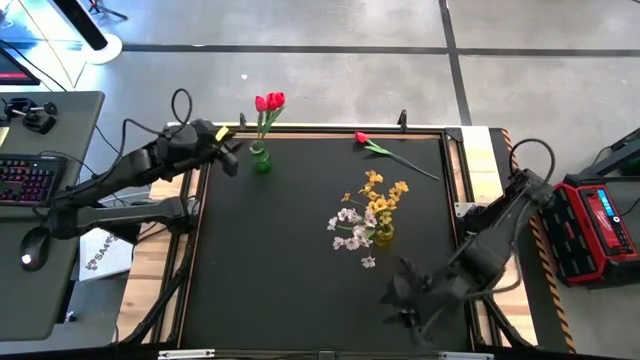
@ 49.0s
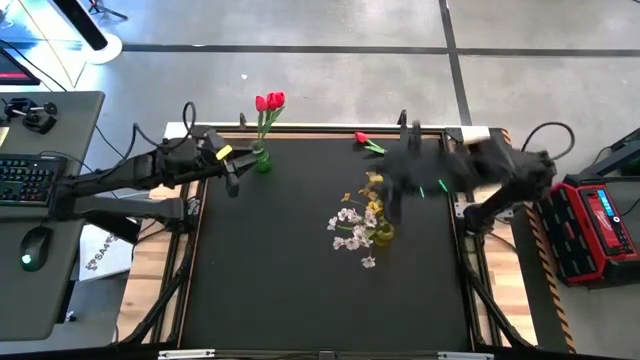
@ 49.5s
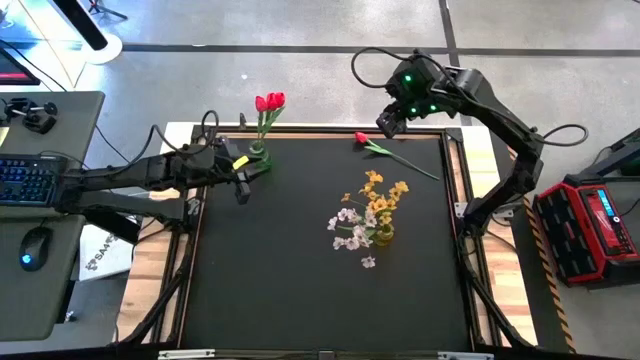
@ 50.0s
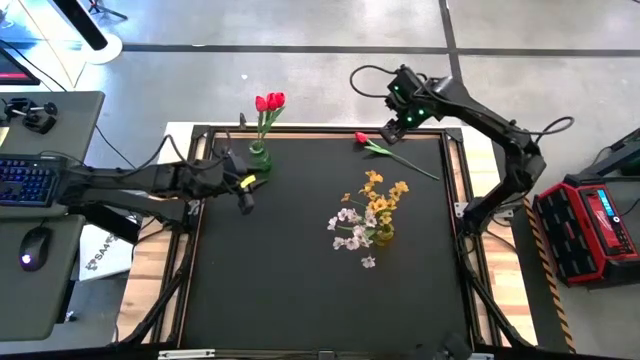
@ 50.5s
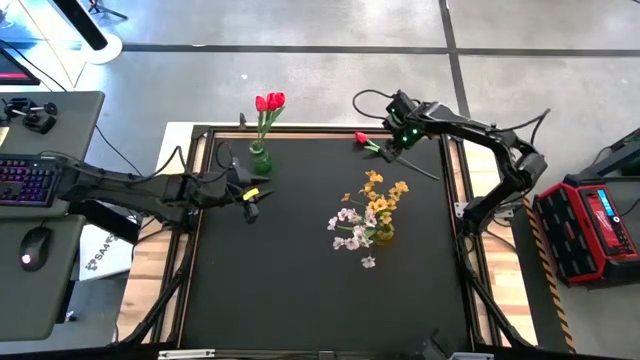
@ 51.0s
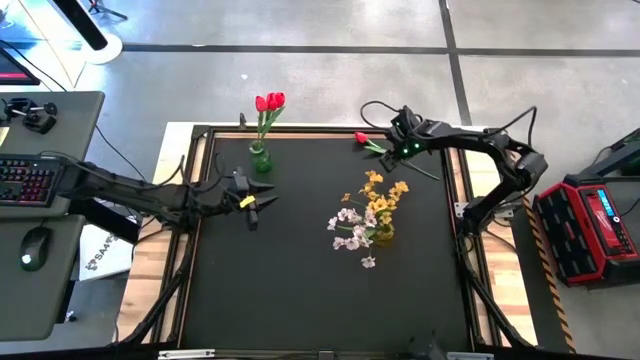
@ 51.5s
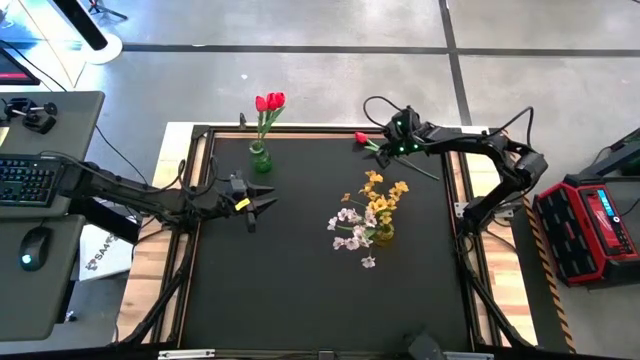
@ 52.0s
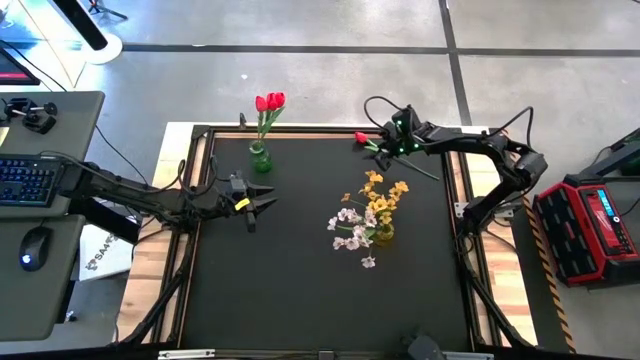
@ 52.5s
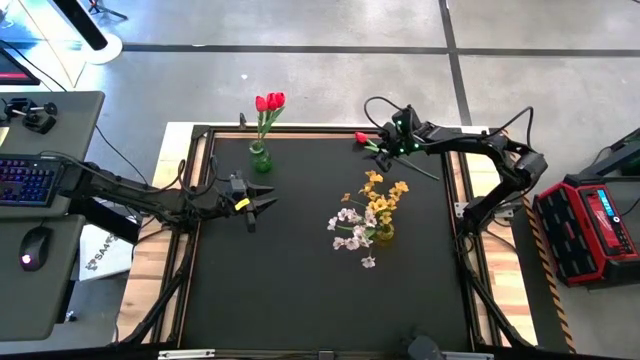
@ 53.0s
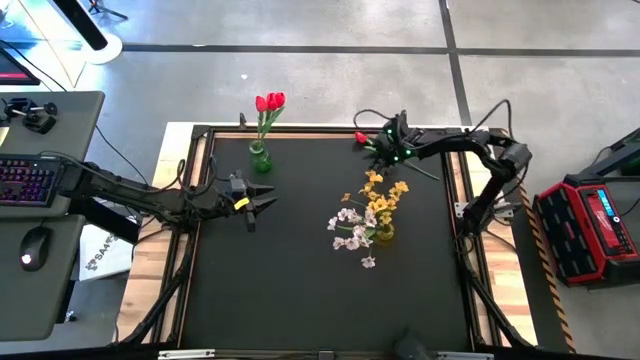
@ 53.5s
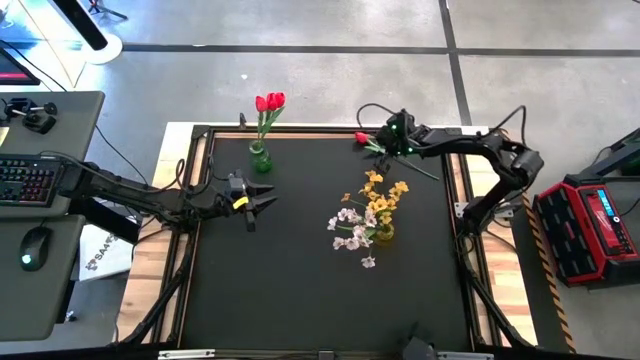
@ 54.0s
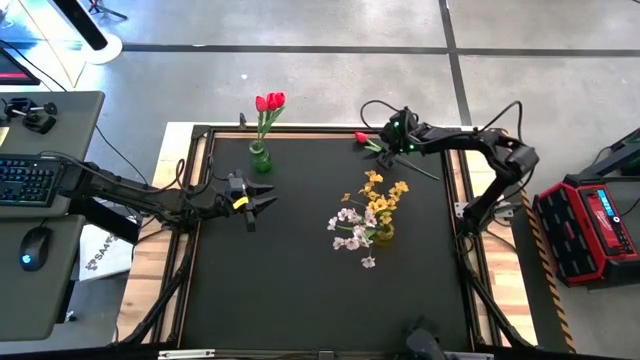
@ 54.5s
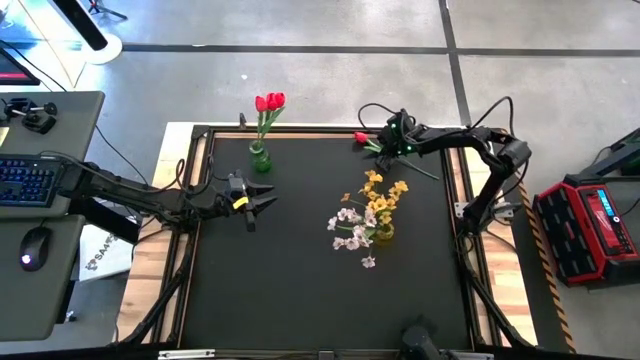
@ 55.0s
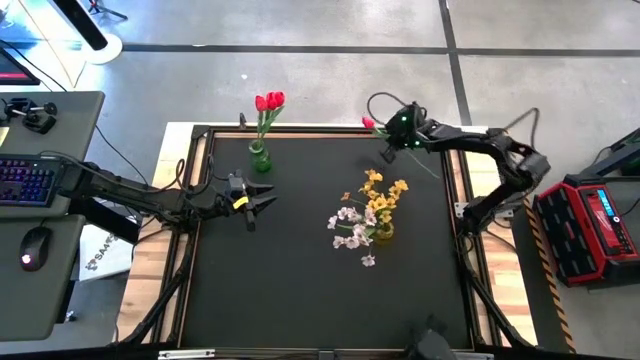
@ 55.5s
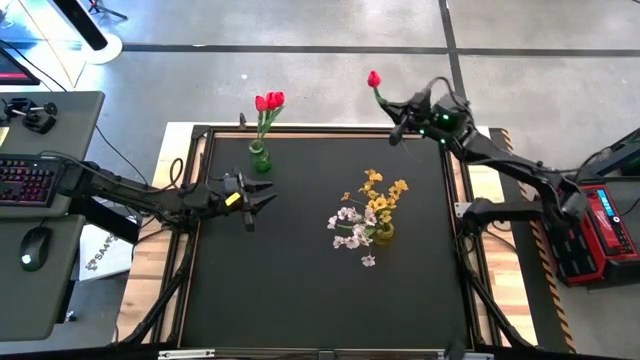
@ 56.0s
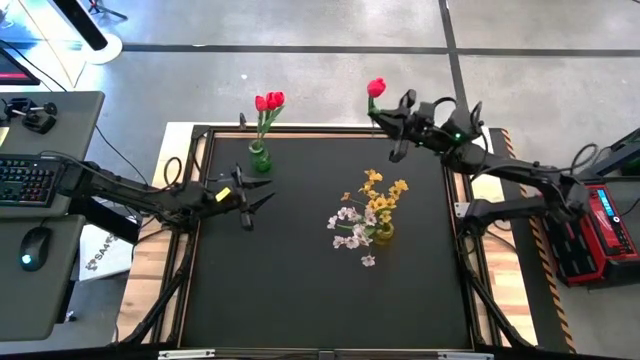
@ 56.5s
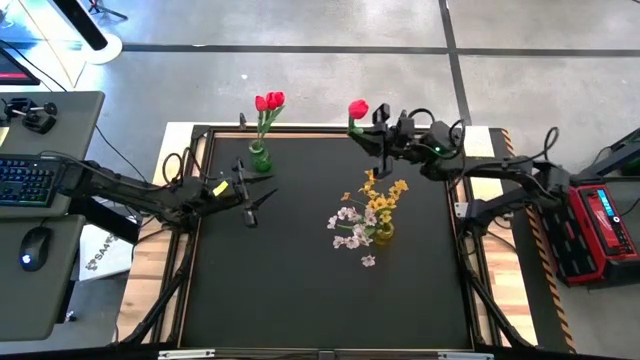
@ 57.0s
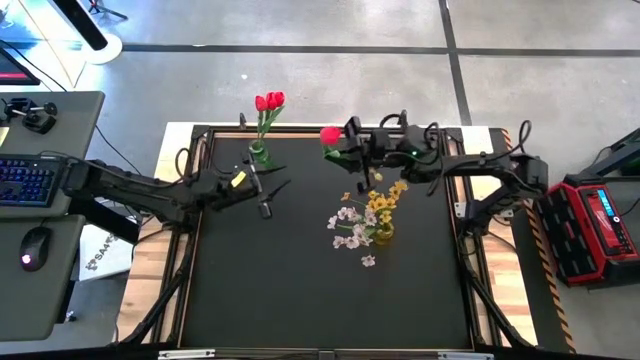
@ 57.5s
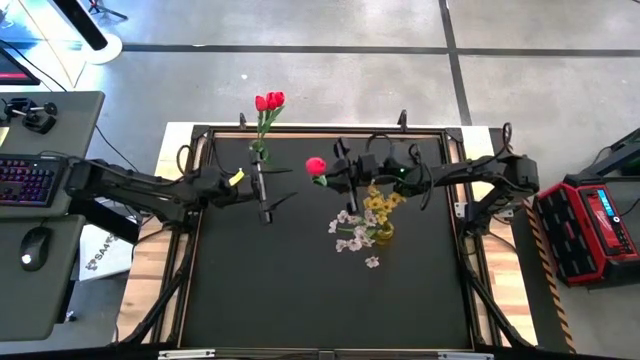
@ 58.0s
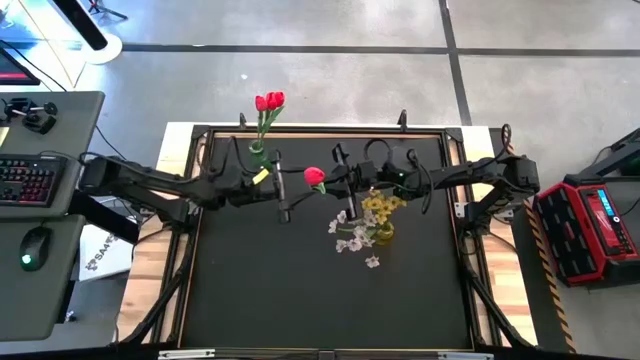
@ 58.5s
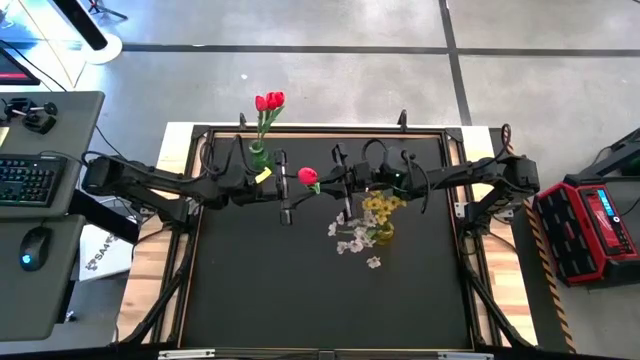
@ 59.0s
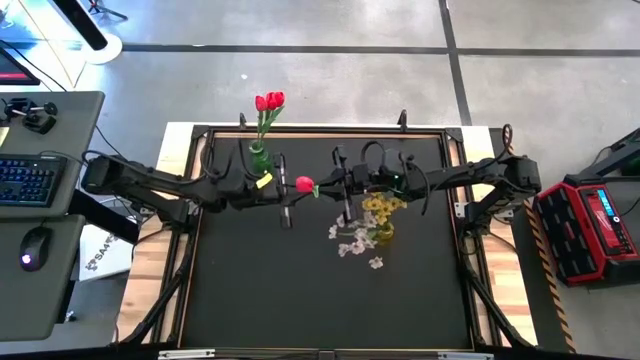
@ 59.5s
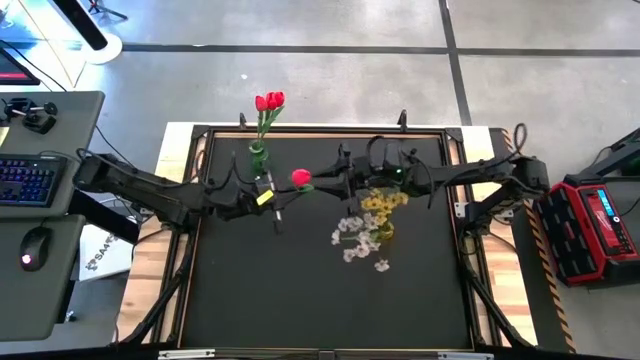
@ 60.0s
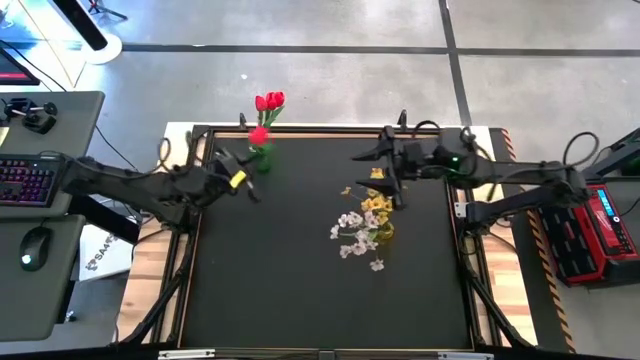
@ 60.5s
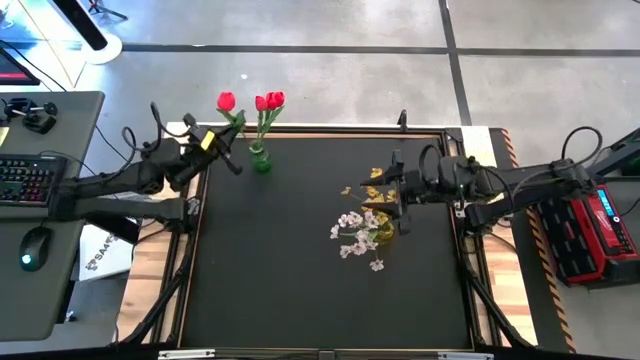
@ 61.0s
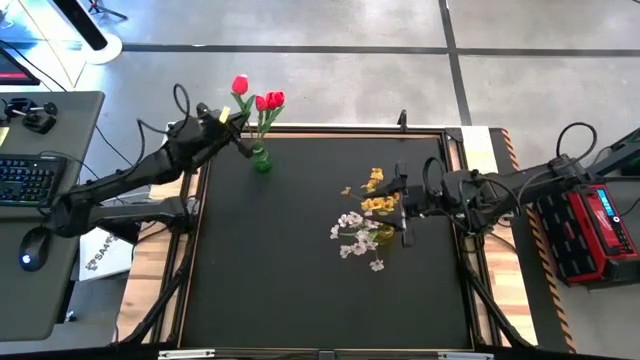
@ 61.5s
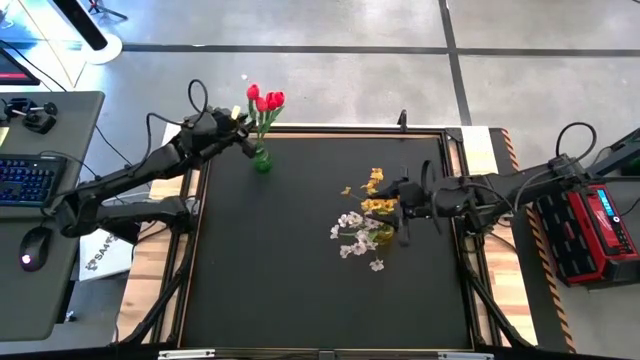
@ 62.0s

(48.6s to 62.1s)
Task: Sort flowers into vase by color
Put the red flower into the green vase

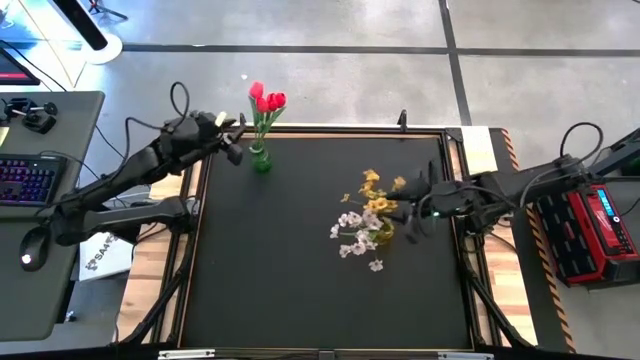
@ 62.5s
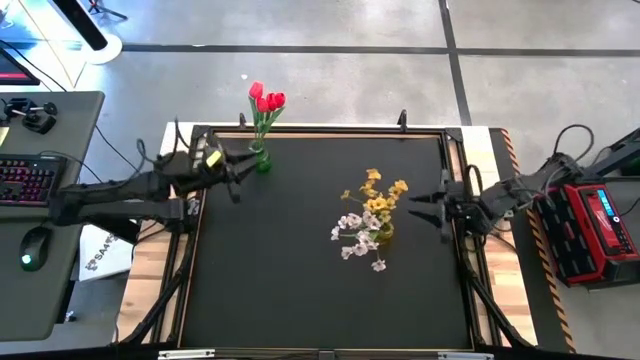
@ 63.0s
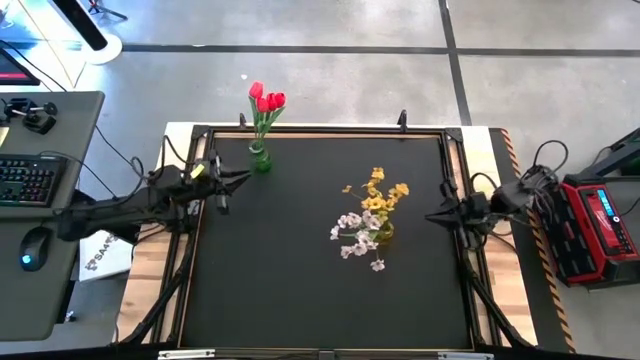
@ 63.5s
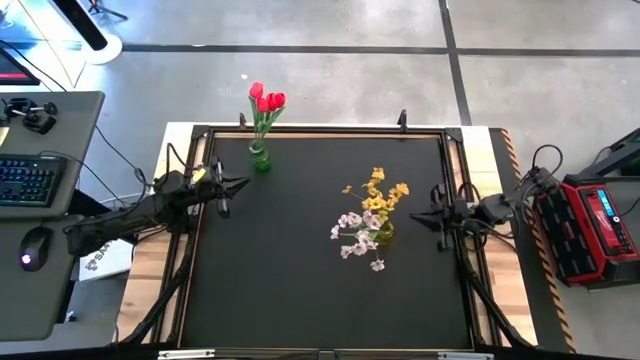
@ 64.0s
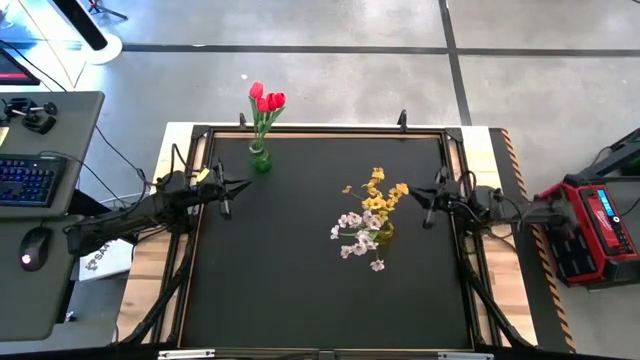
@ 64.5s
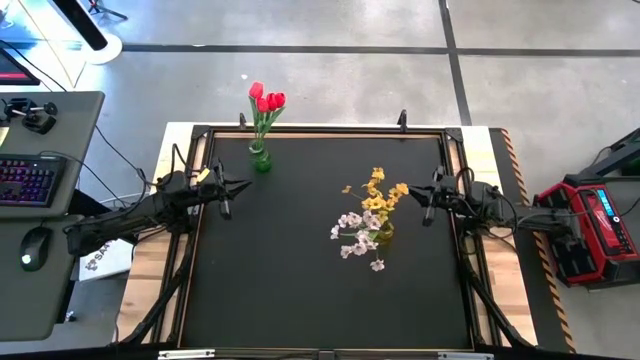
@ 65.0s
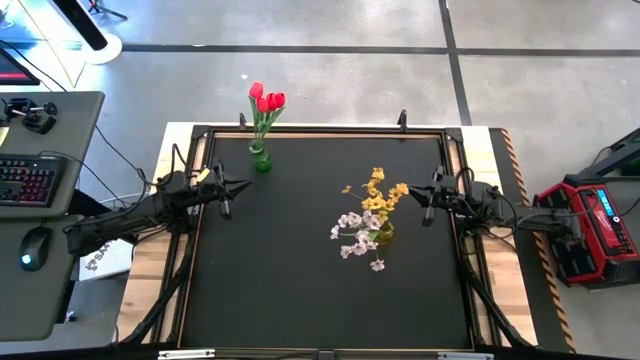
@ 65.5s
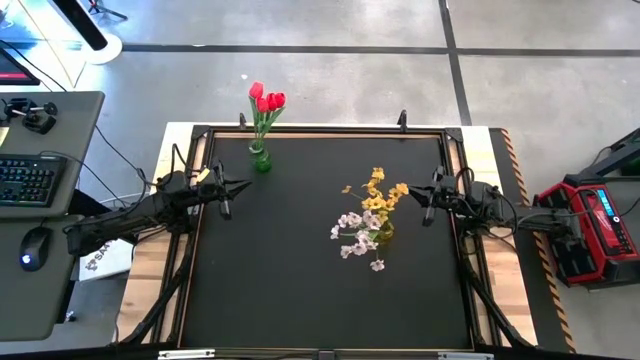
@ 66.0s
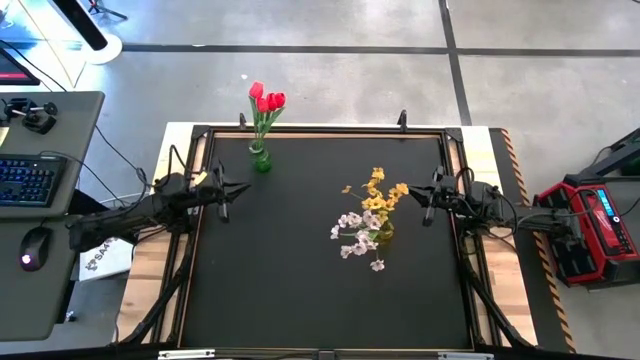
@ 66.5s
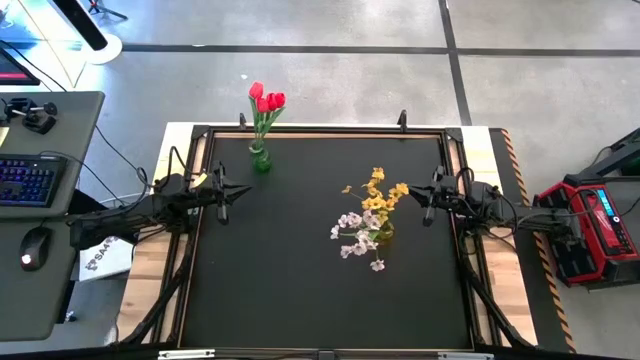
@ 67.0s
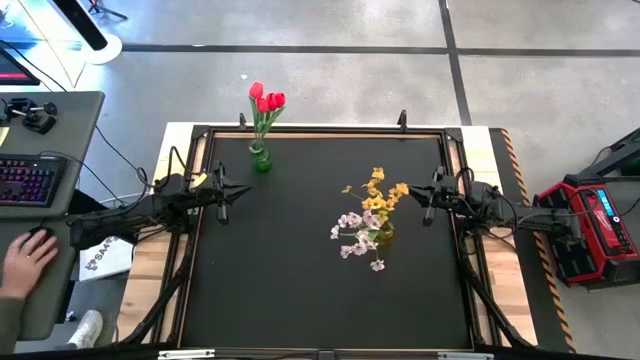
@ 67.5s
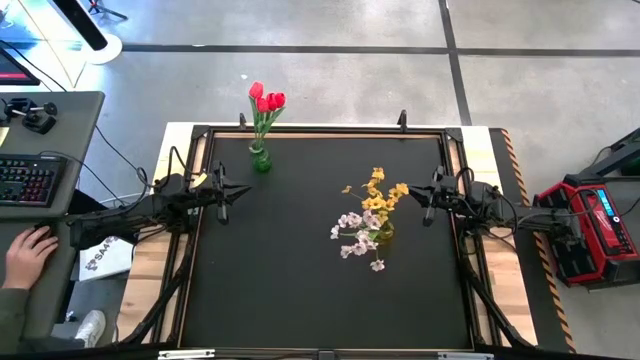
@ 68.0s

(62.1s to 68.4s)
Return to Home Position

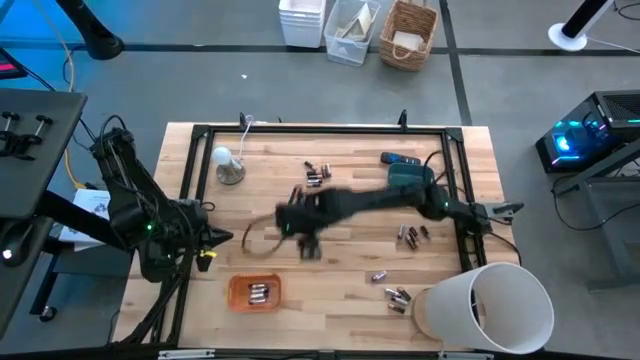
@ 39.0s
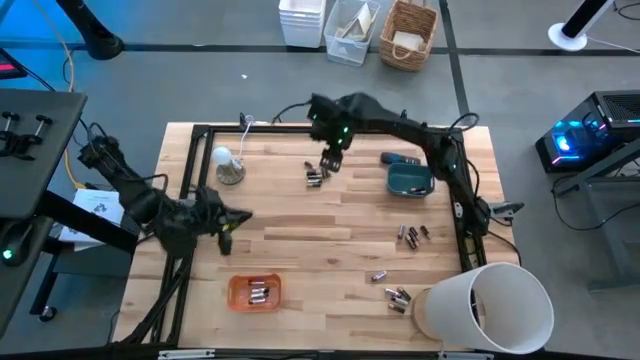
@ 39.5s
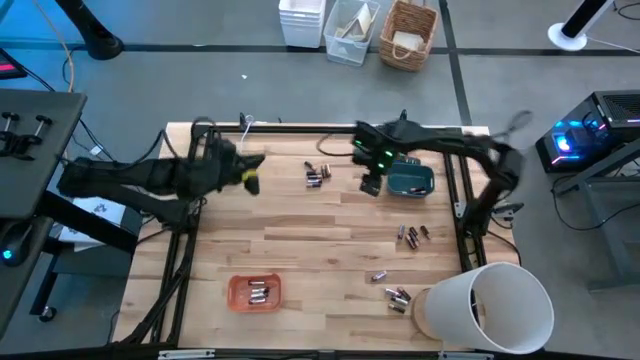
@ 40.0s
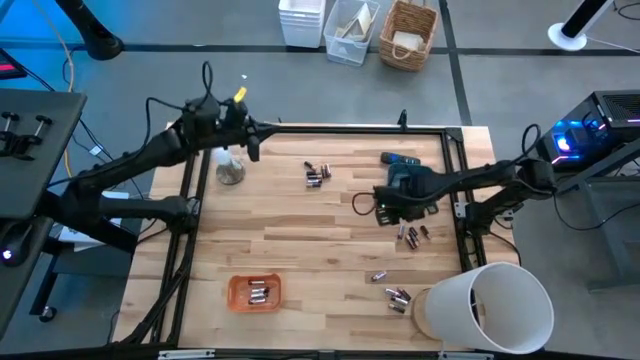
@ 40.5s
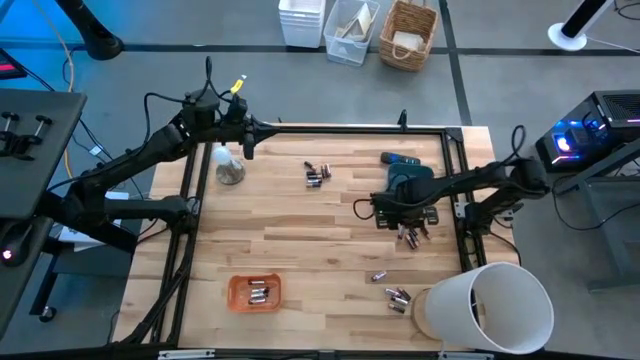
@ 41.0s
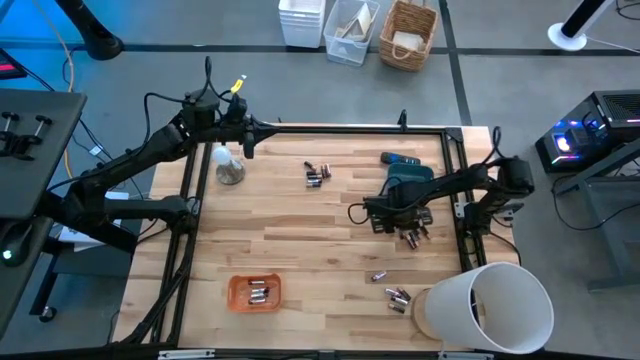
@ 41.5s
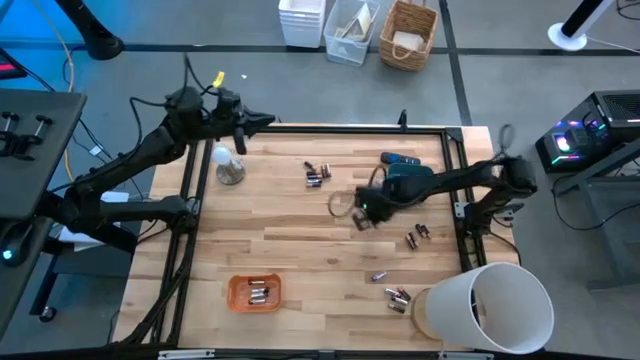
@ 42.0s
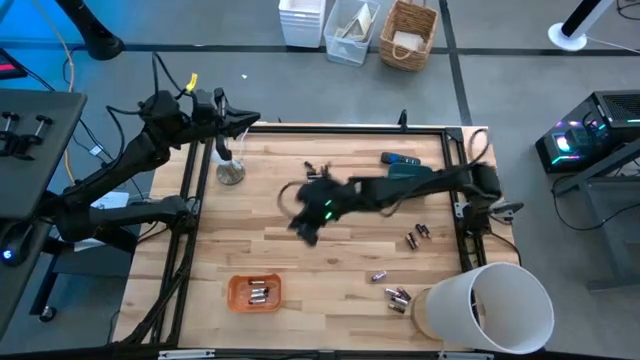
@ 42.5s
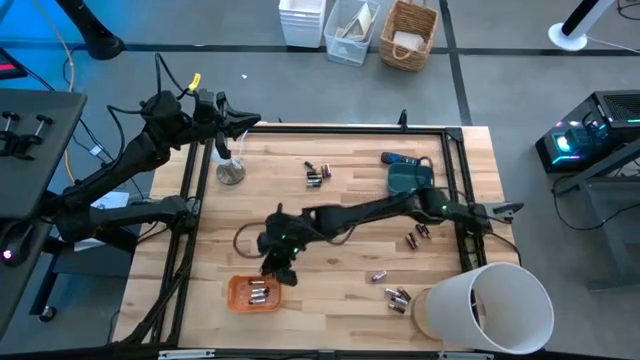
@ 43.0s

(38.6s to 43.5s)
Task: Sort batteries
Put the silver battery into the orange bin
